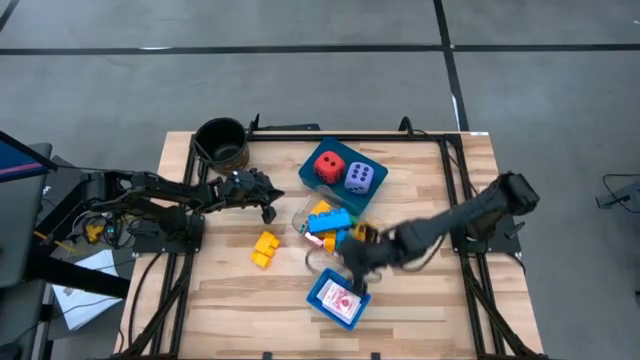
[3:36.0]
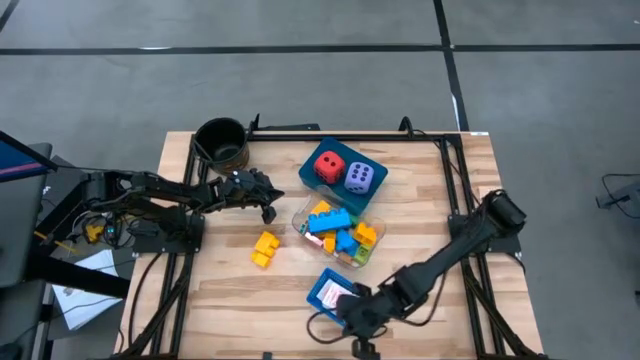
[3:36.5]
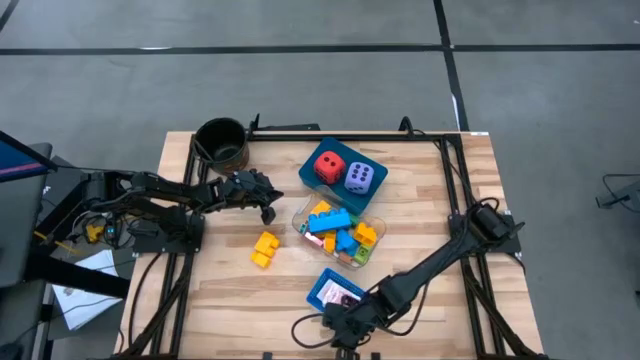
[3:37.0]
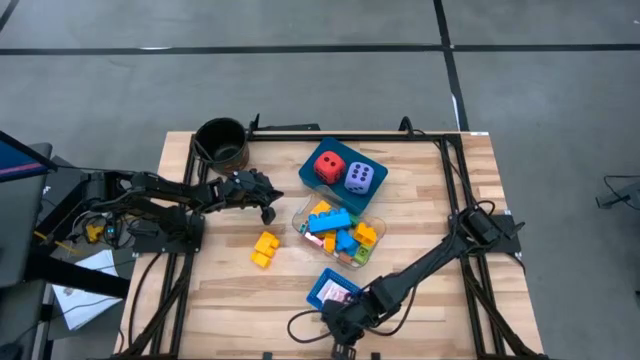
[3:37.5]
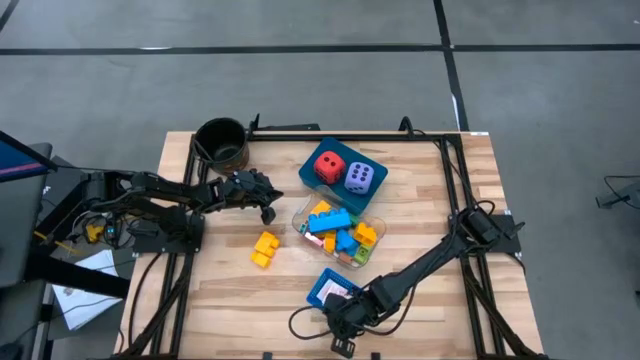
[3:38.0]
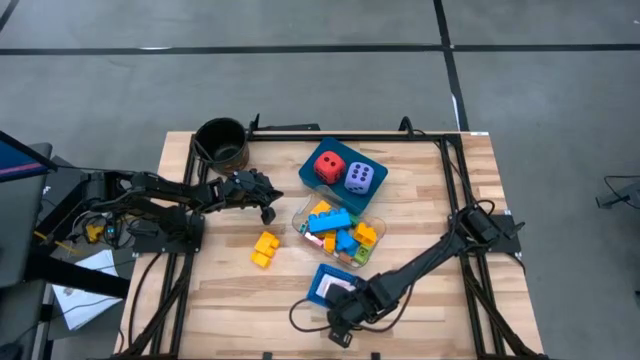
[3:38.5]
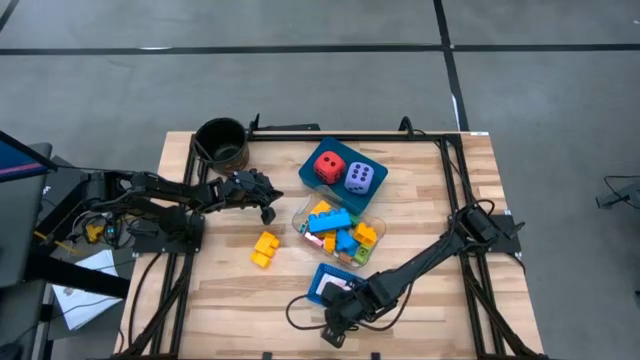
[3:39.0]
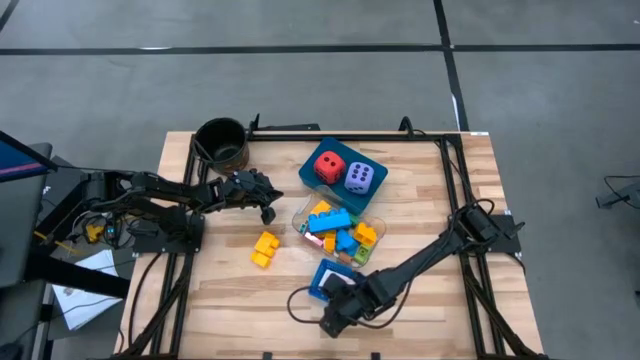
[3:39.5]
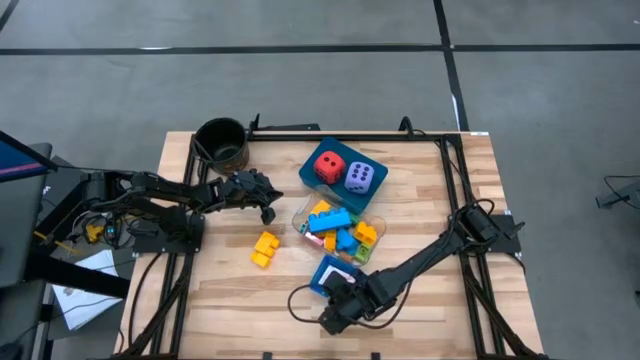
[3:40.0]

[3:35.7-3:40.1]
Task: Pick & Place Toys
Adjust the blue bin

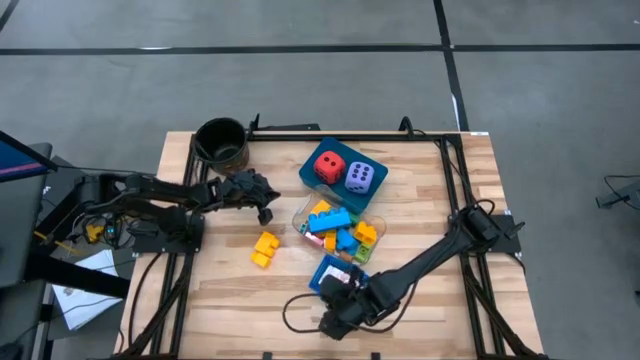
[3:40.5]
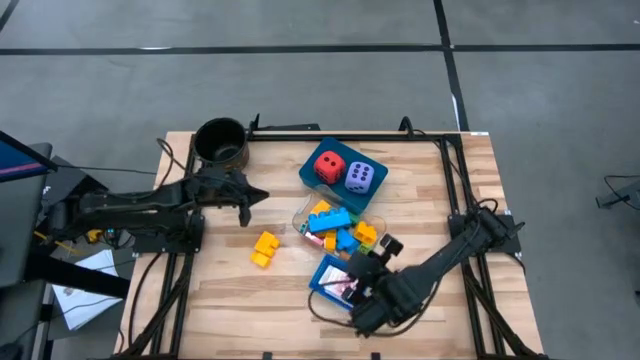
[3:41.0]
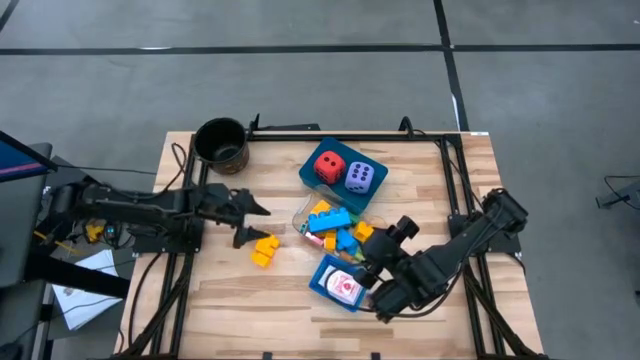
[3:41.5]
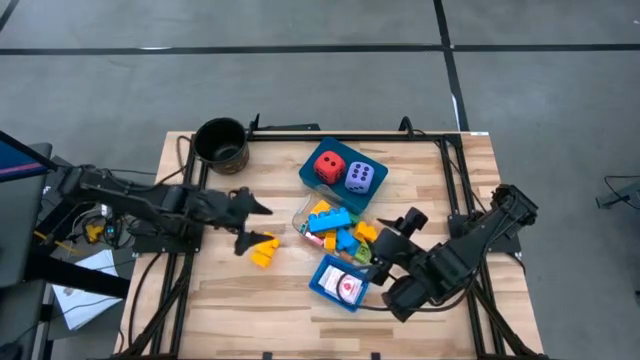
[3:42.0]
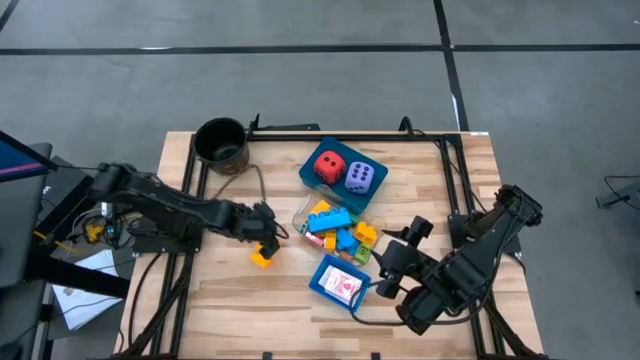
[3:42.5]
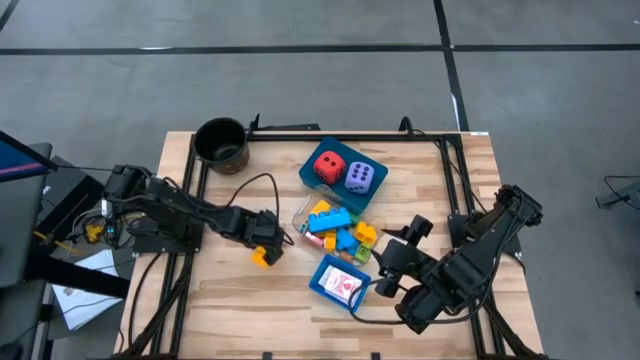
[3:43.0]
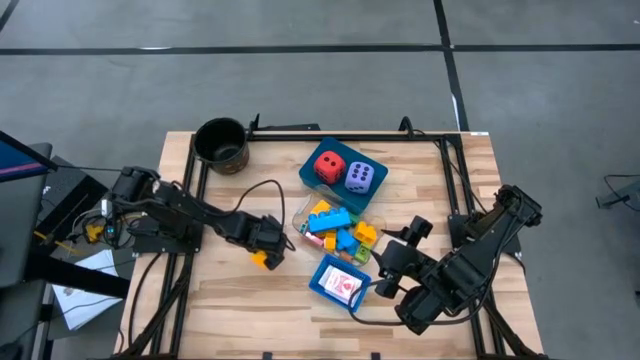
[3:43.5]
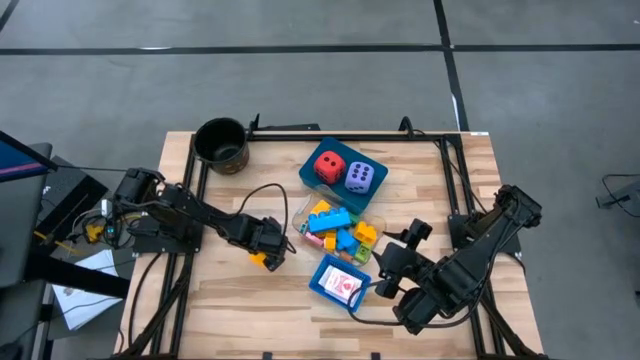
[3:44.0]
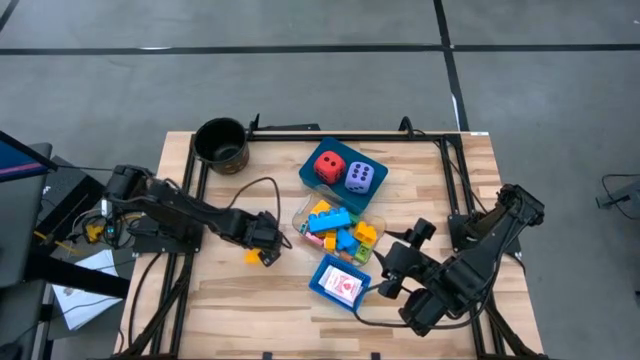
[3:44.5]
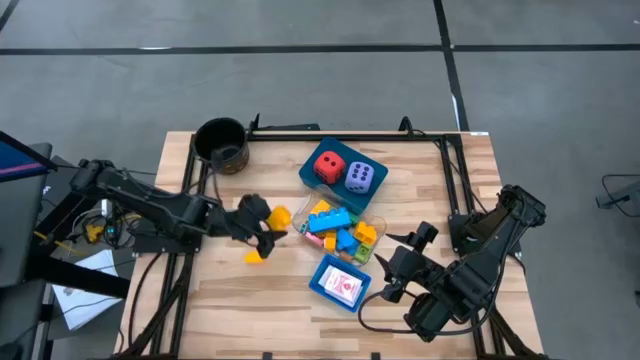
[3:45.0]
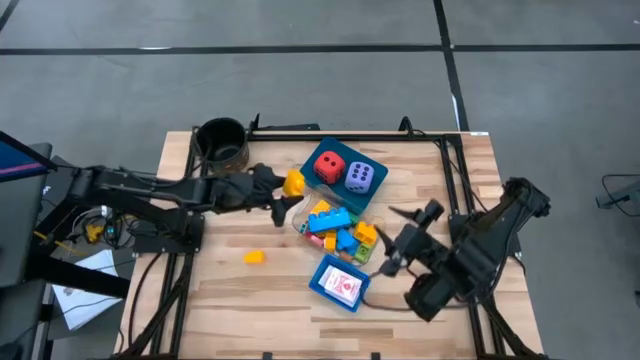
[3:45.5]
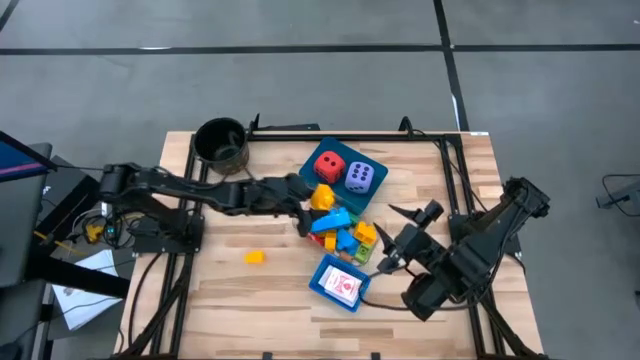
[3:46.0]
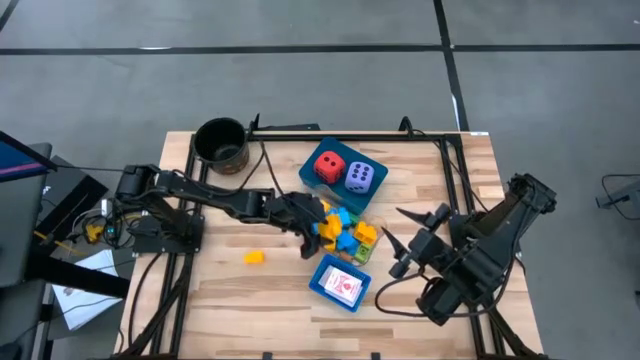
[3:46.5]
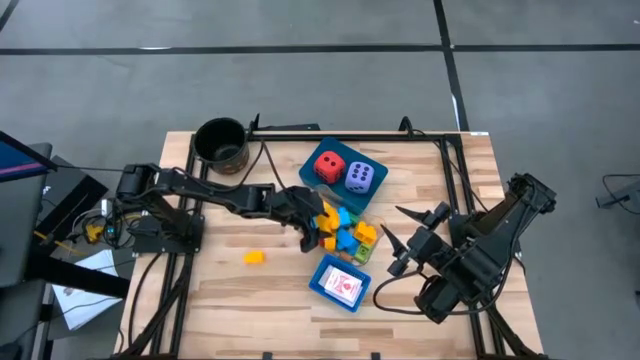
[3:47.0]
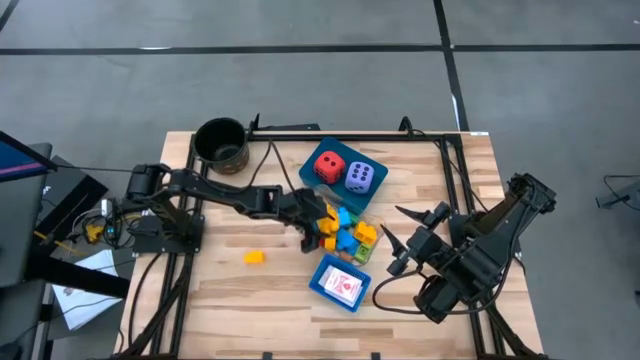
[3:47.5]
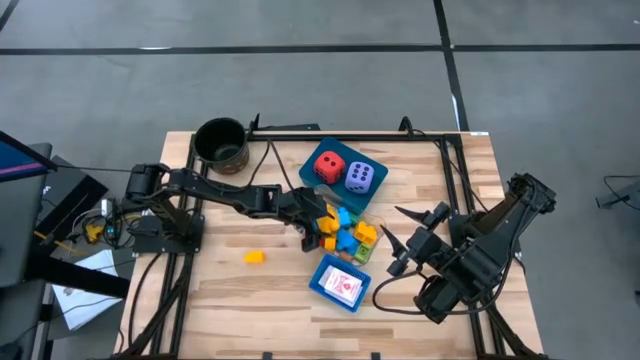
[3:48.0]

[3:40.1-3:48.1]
Put the yellow game piece block into the transparent bin

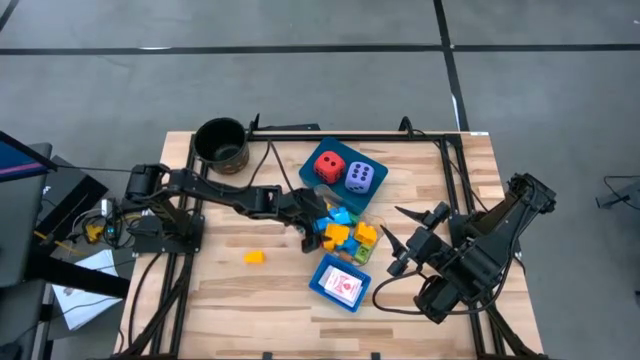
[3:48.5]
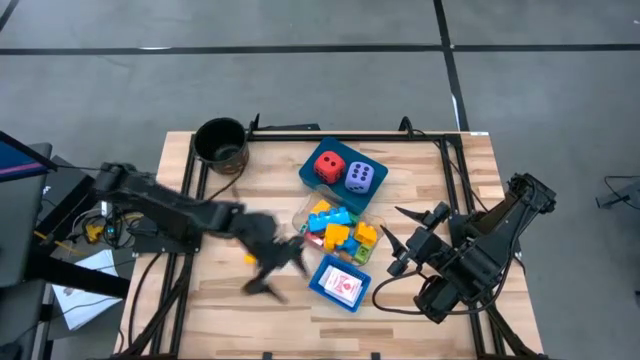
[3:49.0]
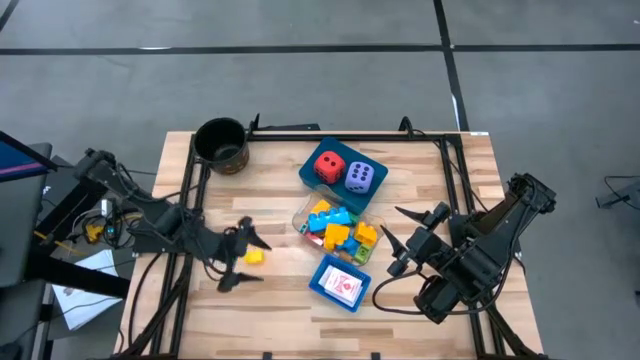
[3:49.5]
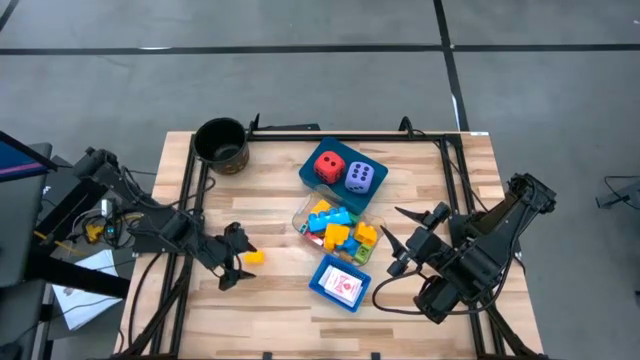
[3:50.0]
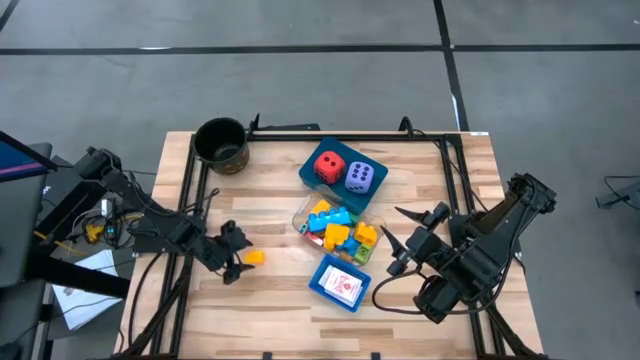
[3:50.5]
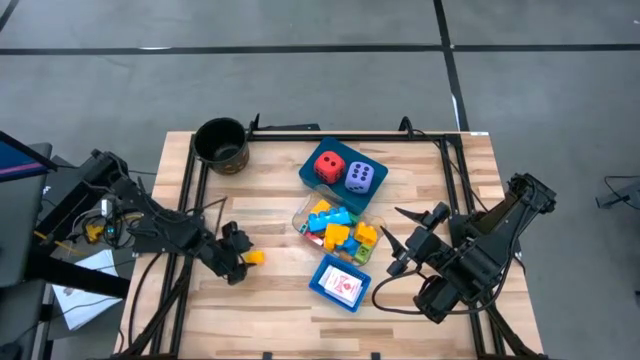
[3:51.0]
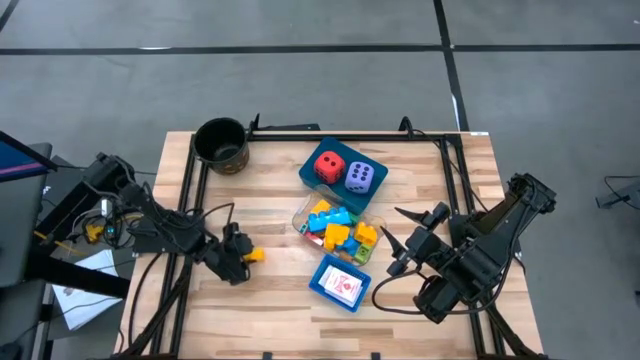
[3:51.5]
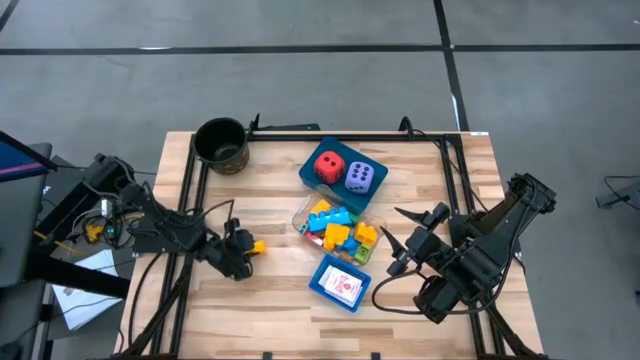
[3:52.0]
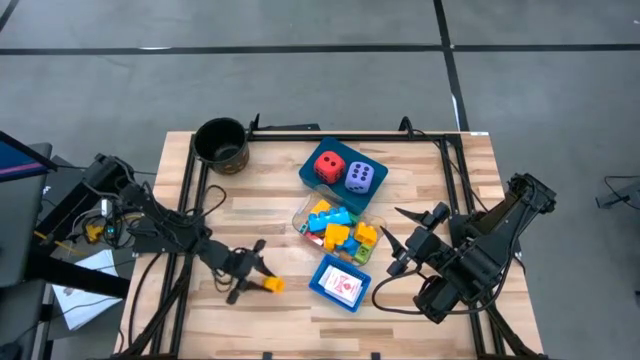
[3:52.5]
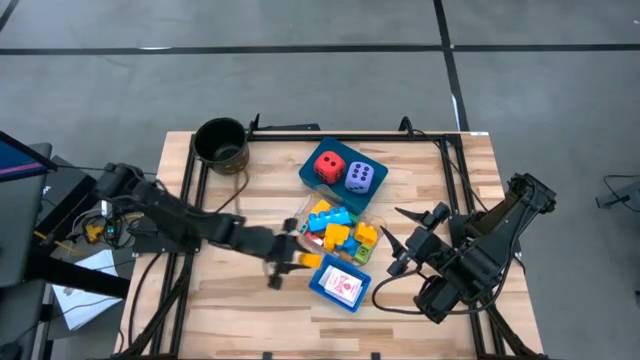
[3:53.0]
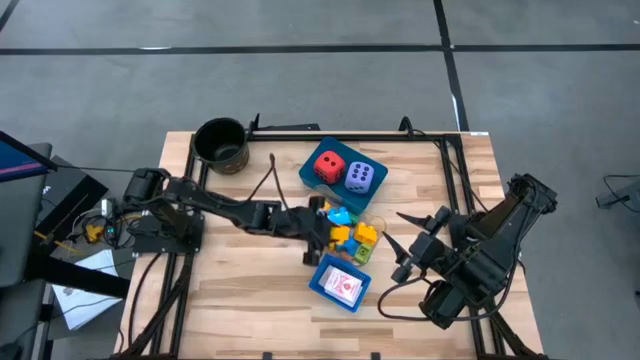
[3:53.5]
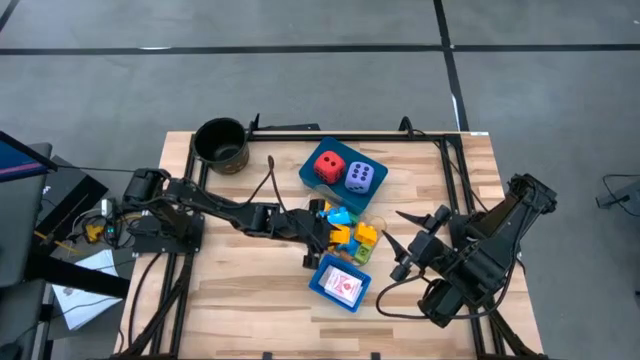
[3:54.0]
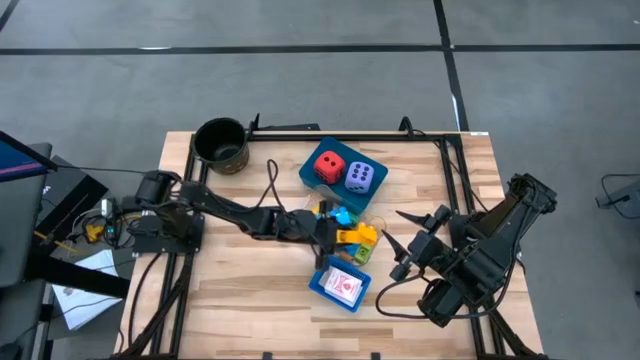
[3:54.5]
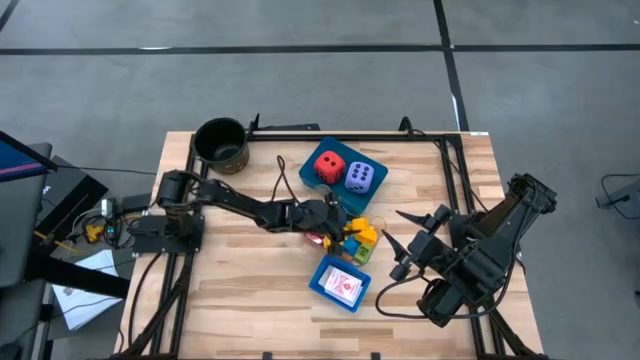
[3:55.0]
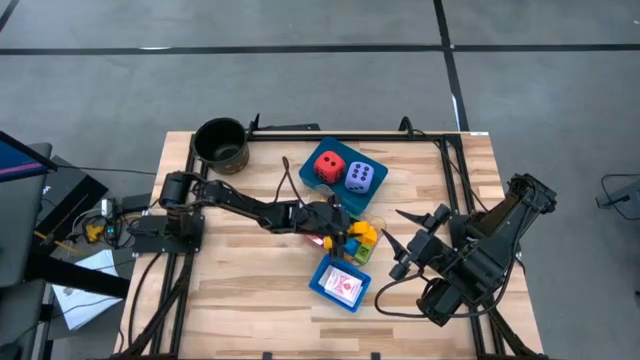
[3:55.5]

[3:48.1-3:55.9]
Put the yellow game piece block into the transparent bin

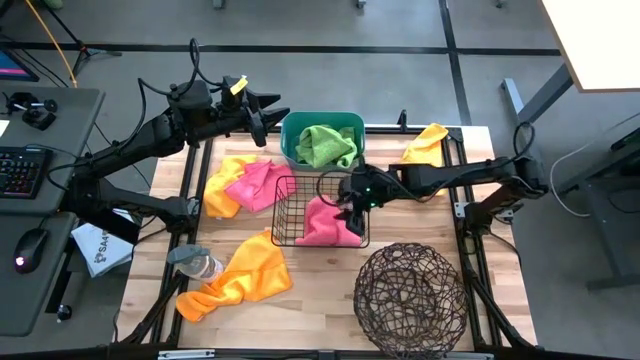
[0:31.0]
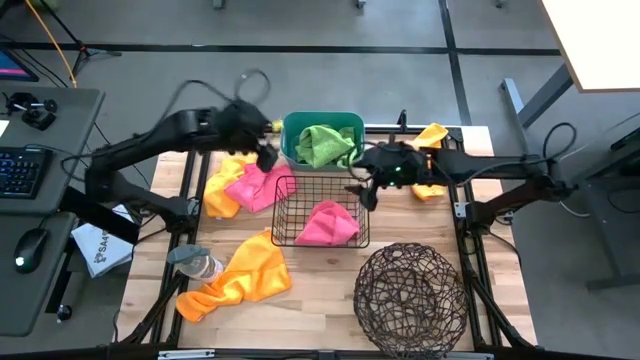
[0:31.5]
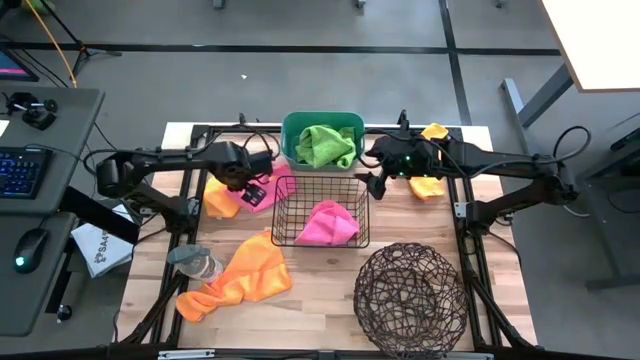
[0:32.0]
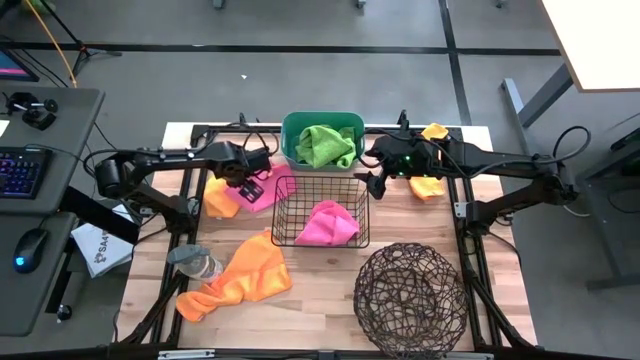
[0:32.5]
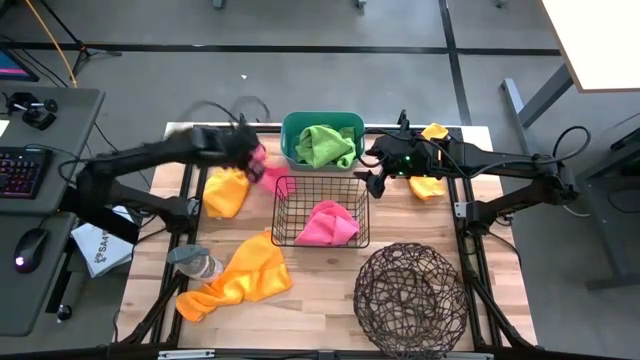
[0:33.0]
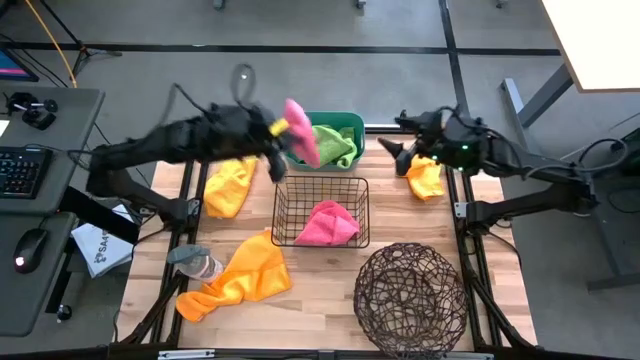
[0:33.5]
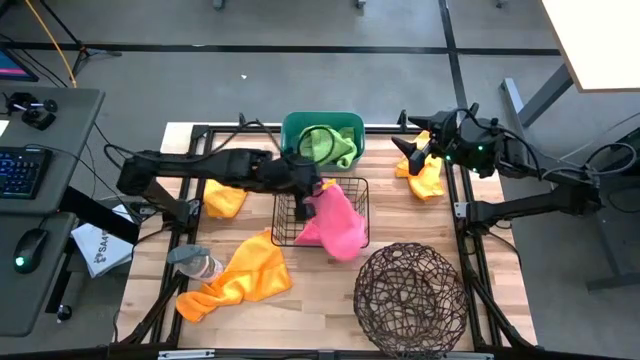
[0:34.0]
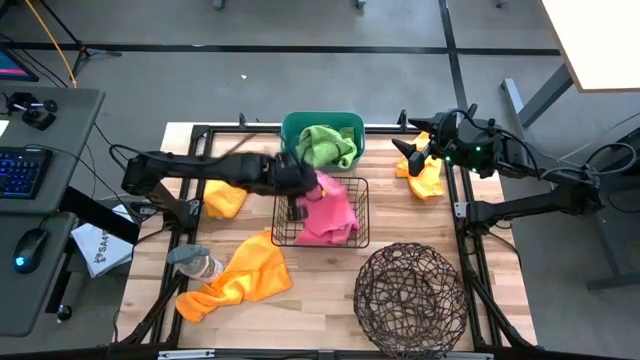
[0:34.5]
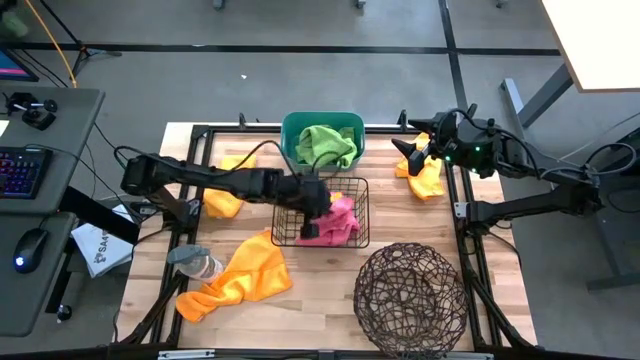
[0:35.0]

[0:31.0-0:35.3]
Task: Sort microfiber towel by color & place in baskets
Put the pink microfiber cloth into the wire basket
